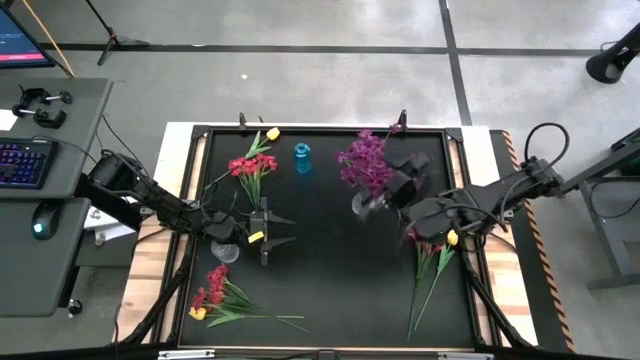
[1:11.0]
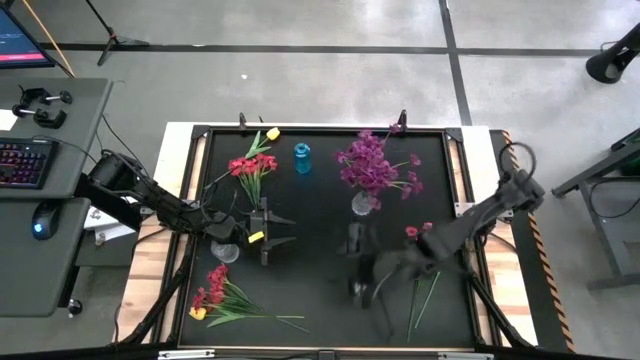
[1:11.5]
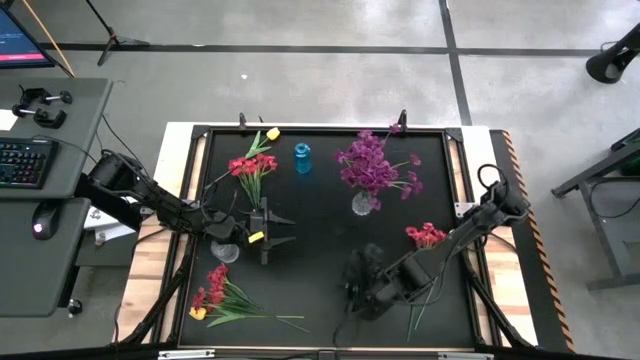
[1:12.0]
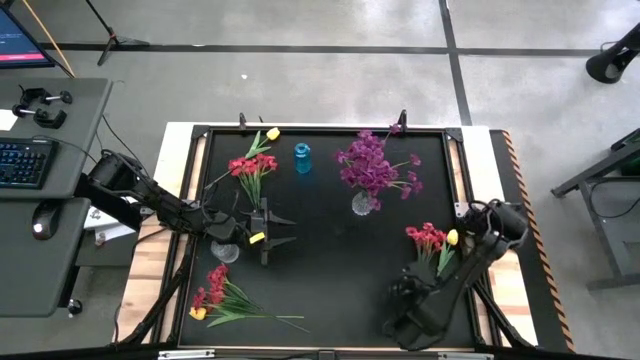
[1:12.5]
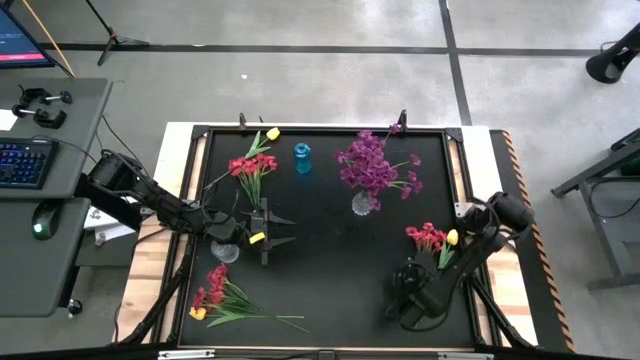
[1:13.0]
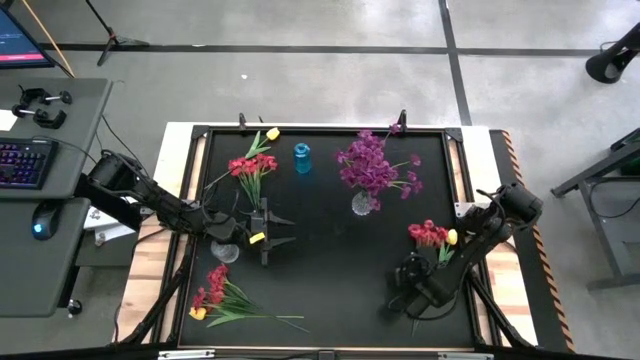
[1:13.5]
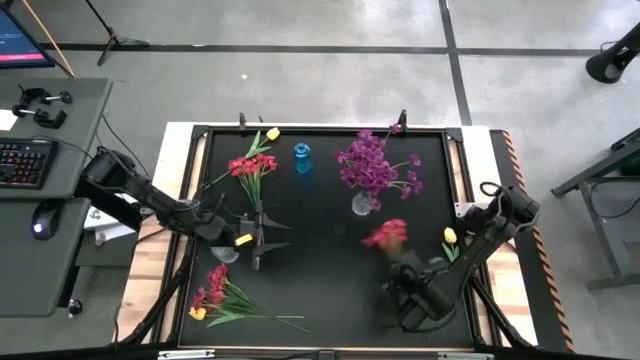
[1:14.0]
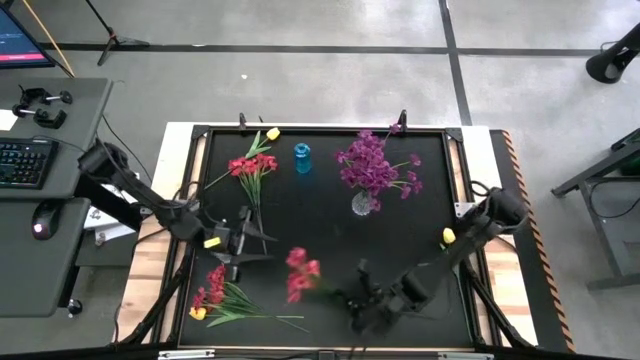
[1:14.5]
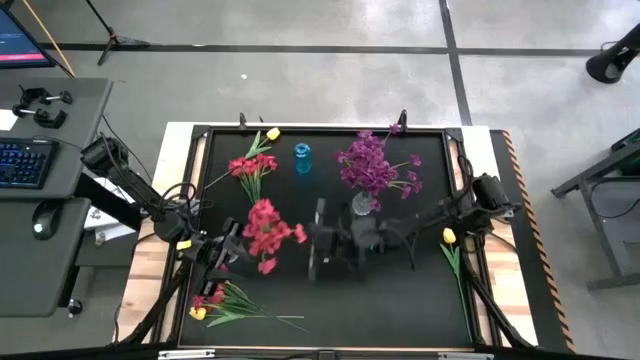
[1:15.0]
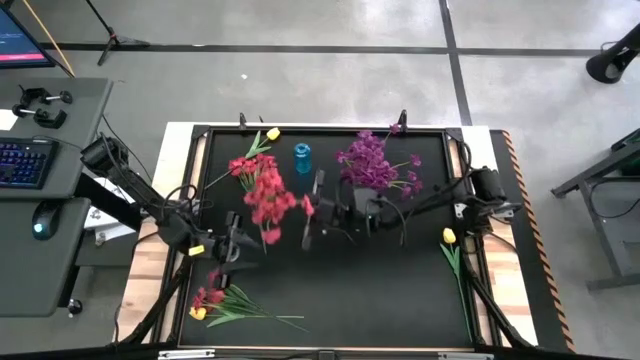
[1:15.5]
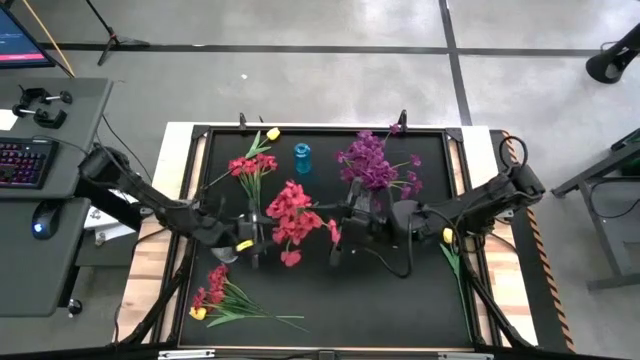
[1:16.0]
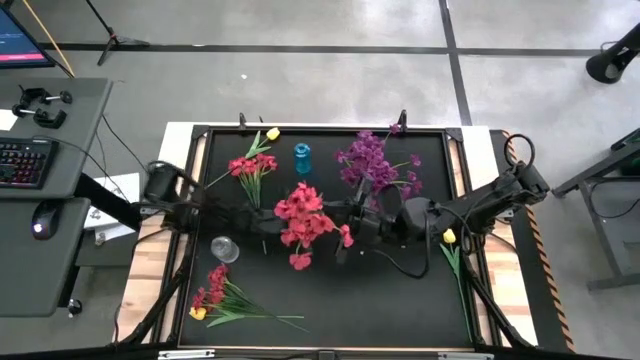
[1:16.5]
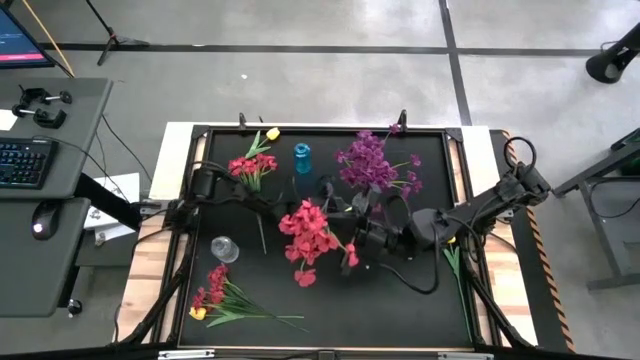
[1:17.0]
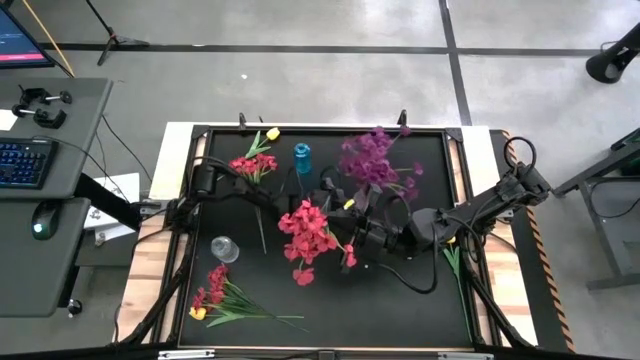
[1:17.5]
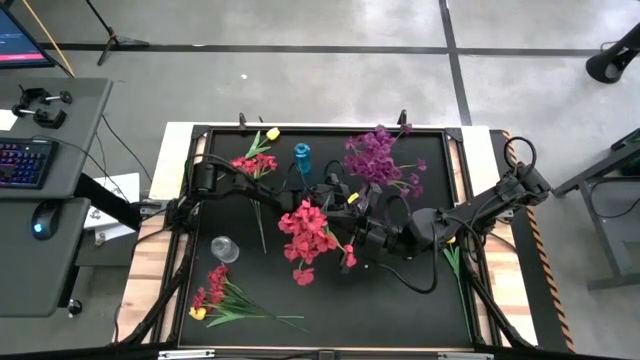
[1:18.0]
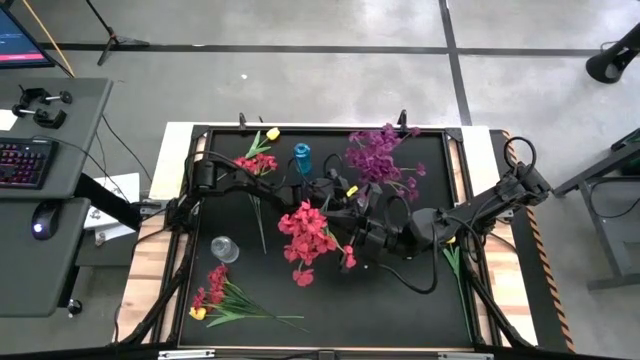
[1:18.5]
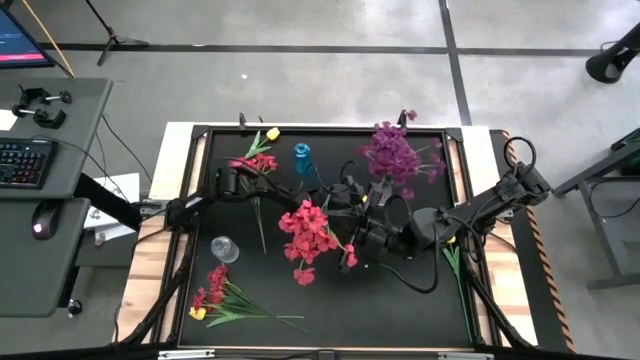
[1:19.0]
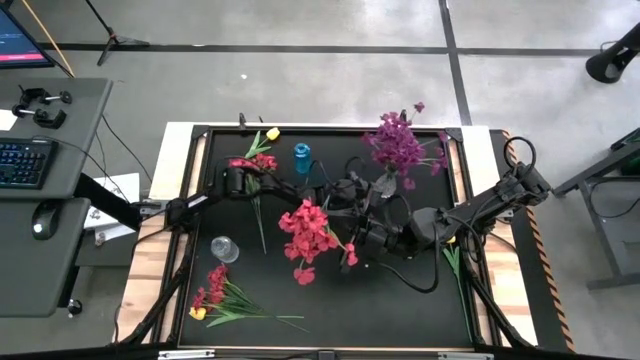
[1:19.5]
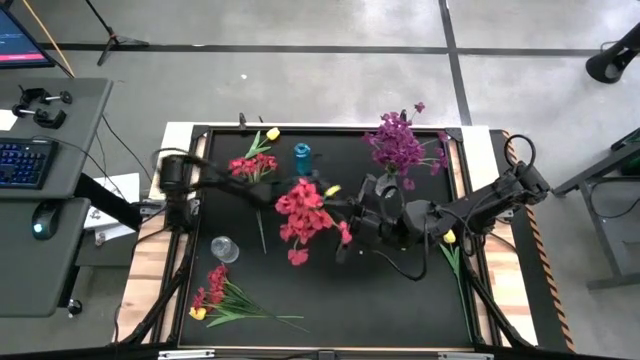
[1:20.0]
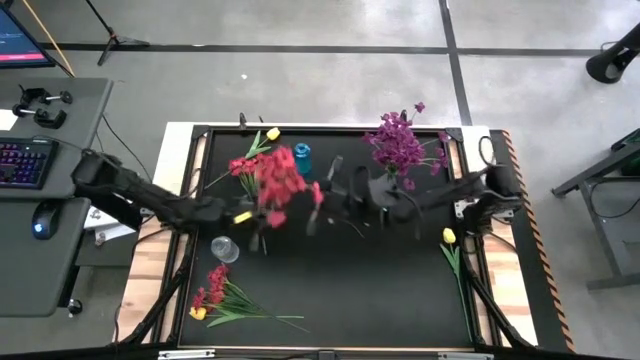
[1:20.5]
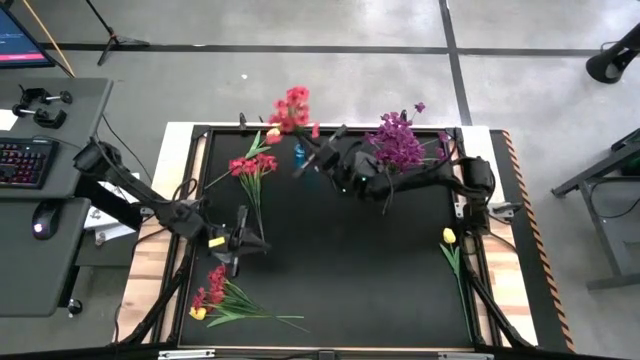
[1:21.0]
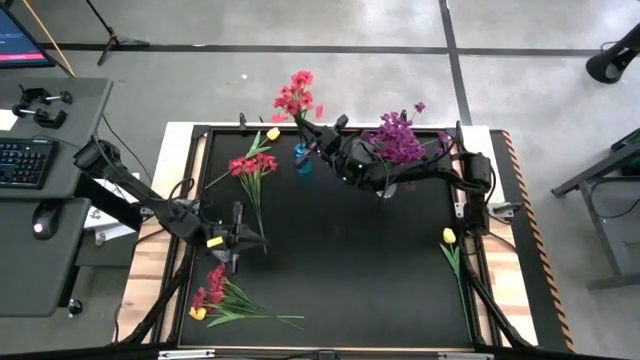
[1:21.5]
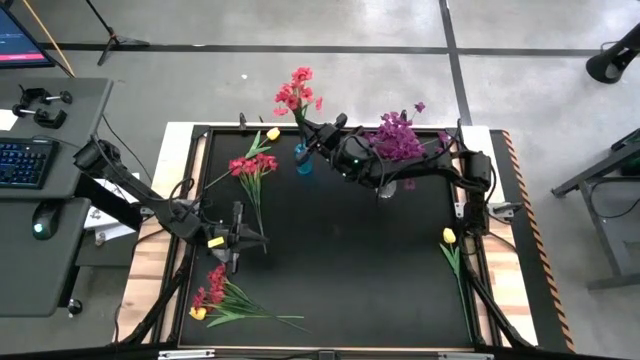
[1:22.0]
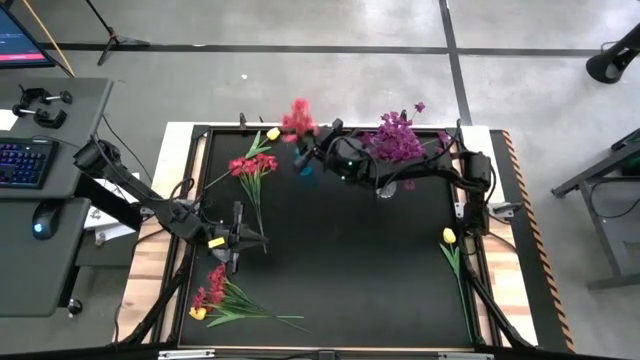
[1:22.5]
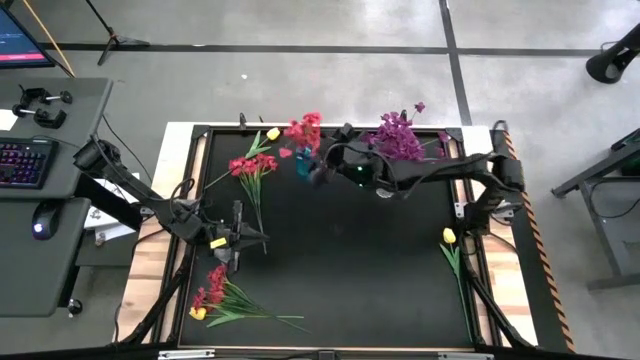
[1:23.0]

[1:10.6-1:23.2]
Task: Sort flowers into vase by color
Put the right red flowers into the blue vase
